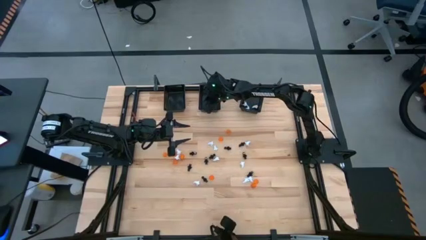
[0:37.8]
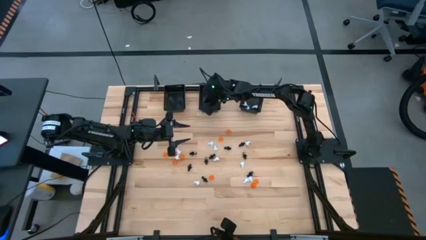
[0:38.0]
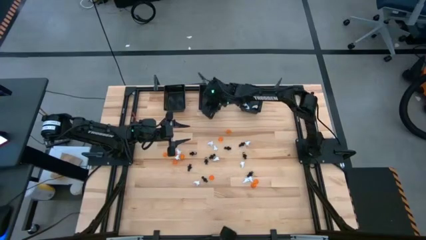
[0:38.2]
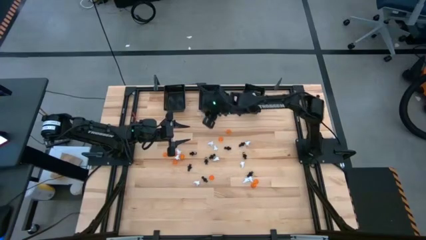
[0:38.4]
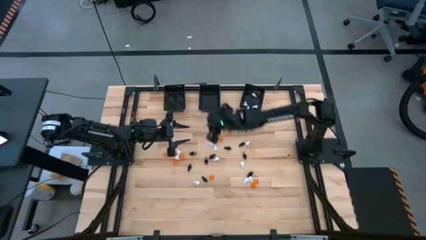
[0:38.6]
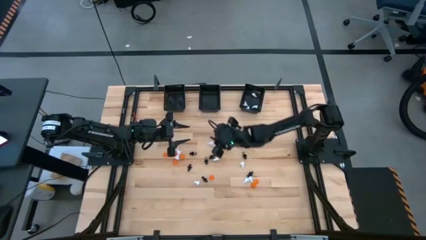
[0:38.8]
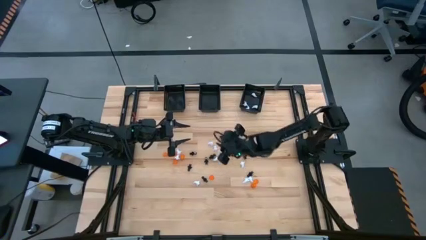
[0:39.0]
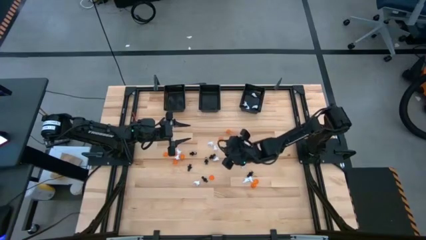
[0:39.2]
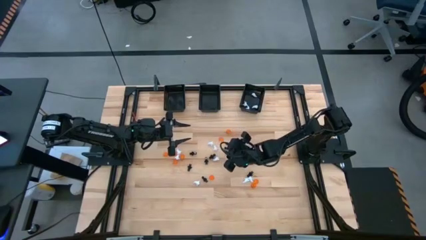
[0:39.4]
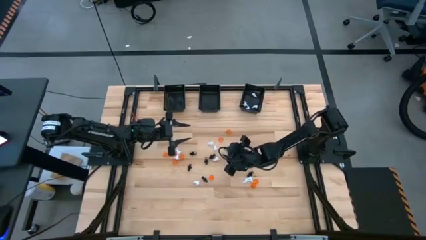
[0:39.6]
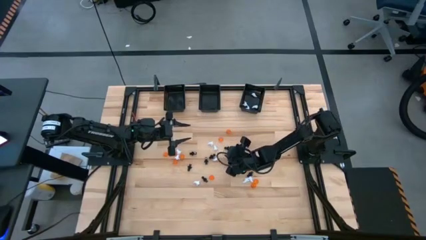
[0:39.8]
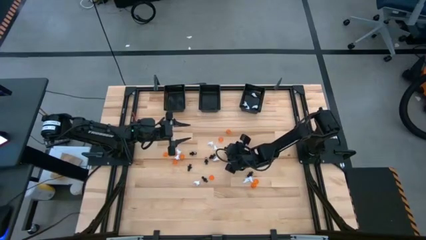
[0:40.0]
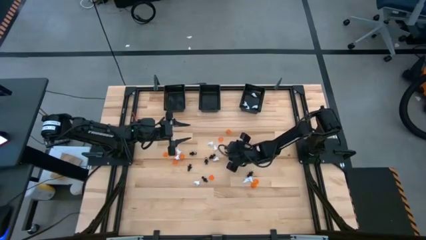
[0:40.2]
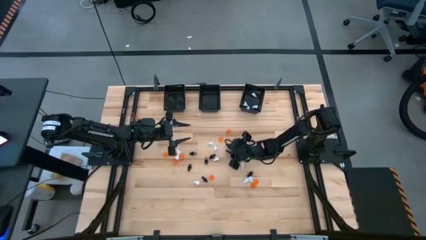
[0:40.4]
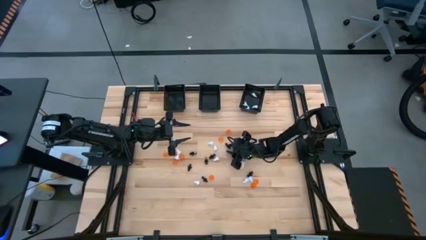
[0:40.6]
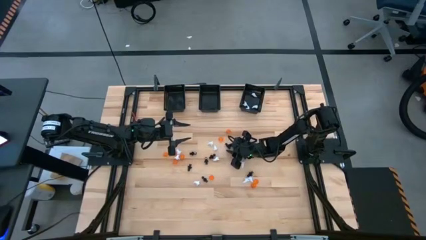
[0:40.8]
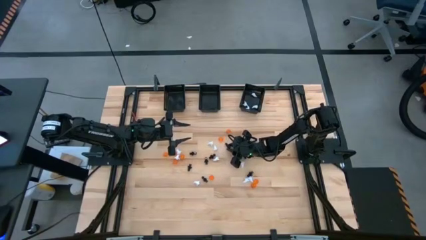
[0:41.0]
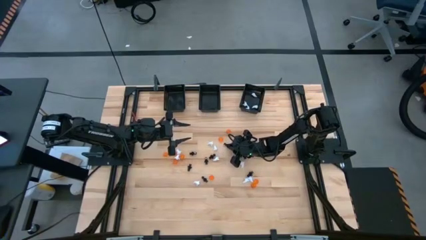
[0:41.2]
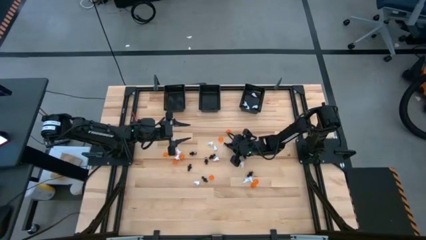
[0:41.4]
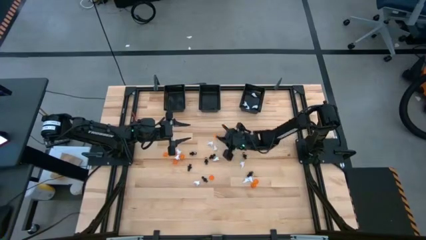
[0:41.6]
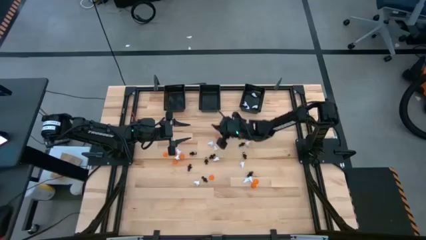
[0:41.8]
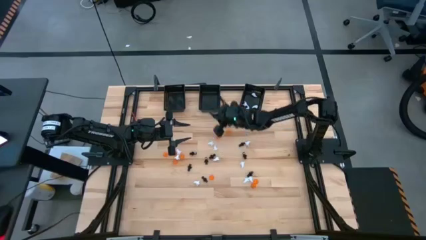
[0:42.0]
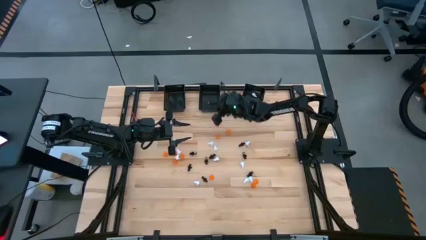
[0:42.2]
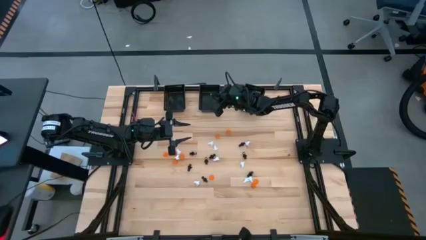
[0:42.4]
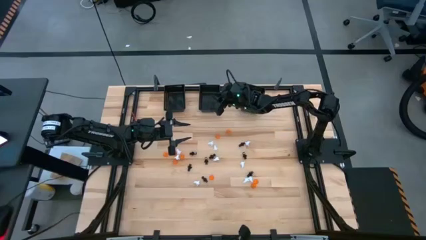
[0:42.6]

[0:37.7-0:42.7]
Task: Sort Halloween decoration
Put the black skeleton toy into the black middle basket

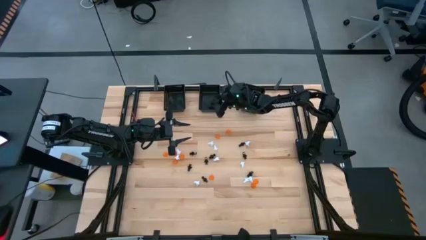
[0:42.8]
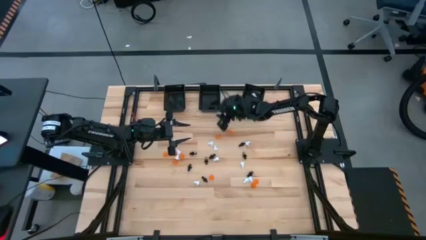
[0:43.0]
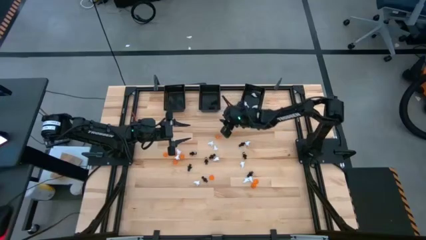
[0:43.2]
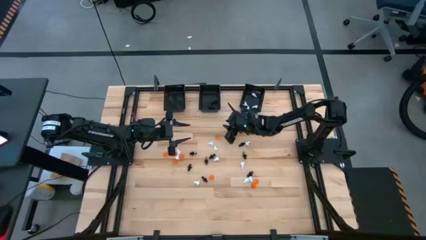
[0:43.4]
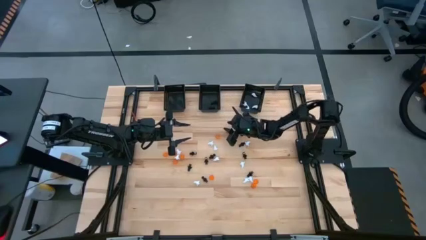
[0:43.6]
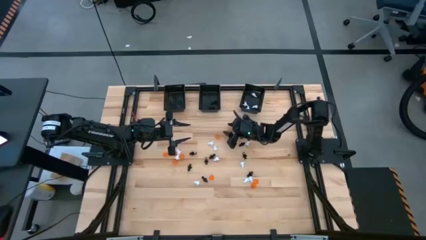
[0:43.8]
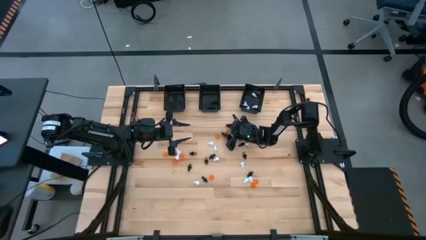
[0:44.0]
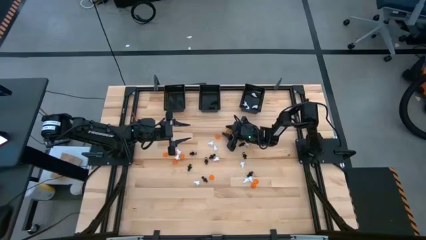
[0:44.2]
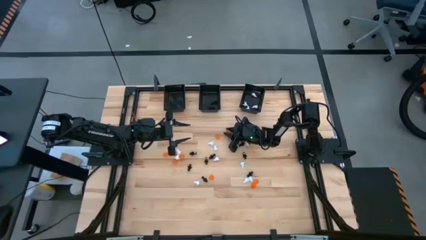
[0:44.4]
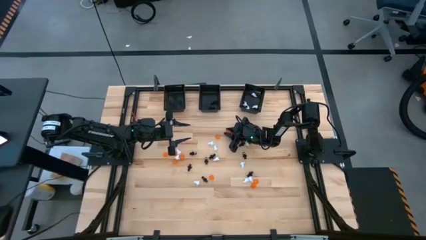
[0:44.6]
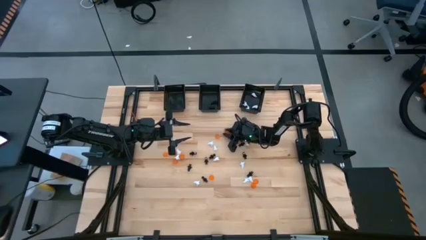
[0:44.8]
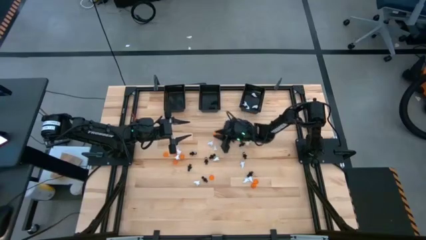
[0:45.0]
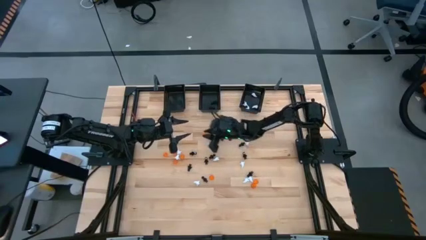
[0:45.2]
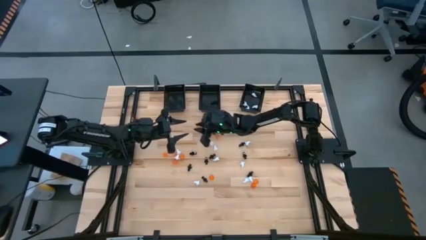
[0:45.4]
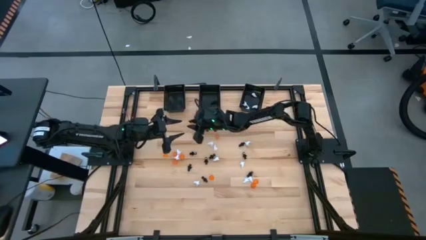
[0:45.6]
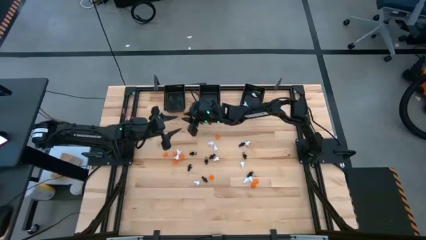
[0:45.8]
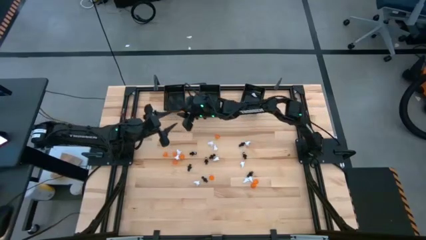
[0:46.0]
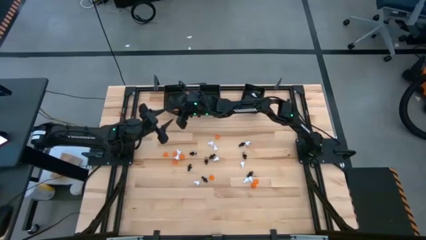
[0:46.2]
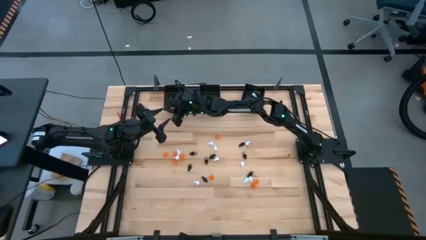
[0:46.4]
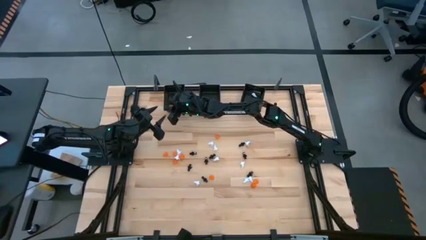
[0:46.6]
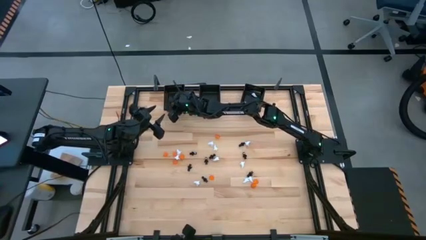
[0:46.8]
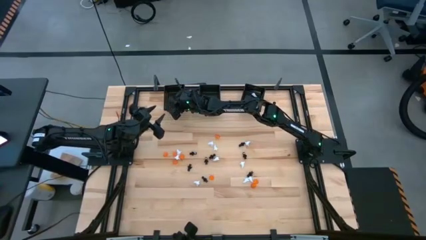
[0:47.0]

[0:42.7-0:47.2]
Put the orange pumpkin toy into the left black basket

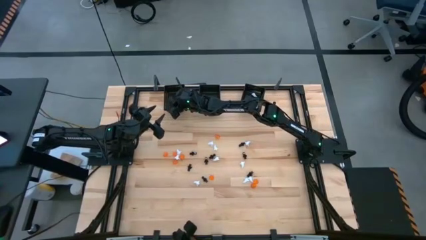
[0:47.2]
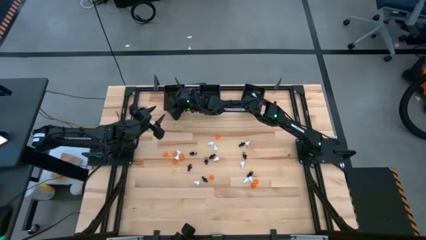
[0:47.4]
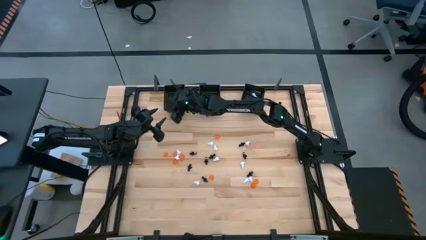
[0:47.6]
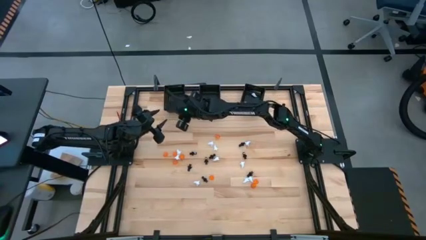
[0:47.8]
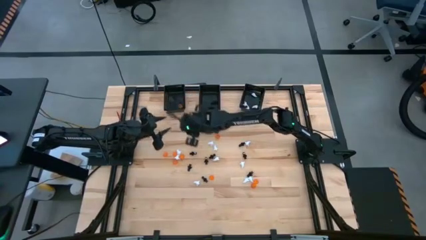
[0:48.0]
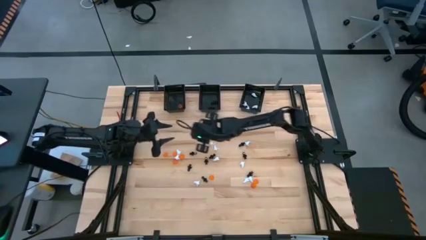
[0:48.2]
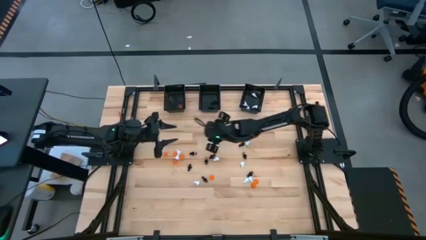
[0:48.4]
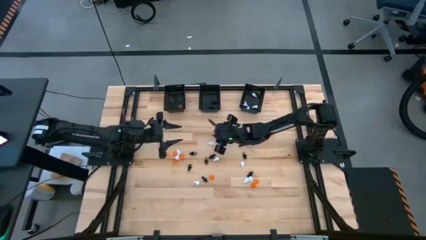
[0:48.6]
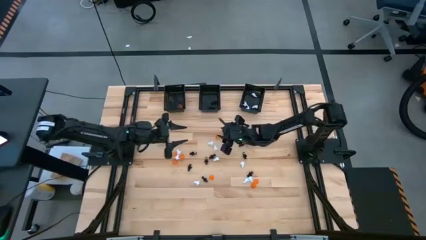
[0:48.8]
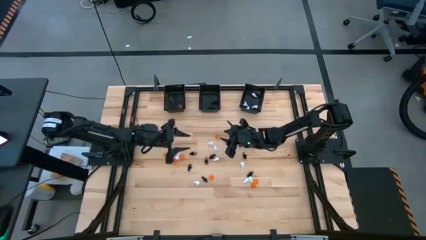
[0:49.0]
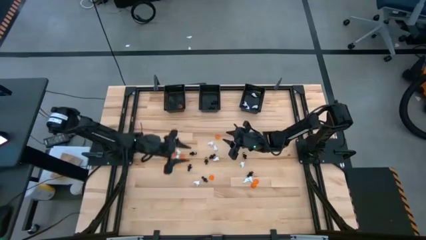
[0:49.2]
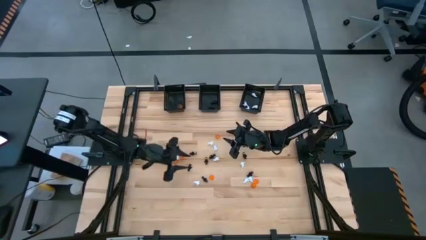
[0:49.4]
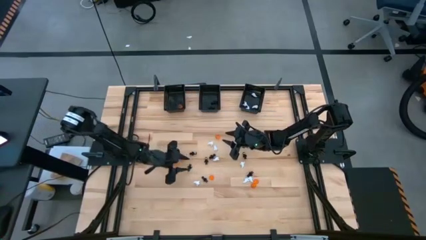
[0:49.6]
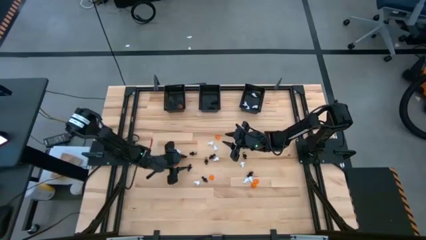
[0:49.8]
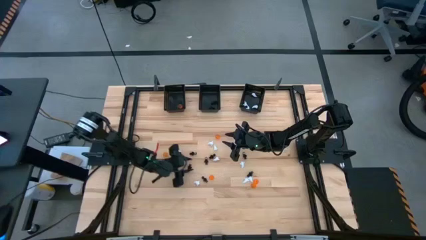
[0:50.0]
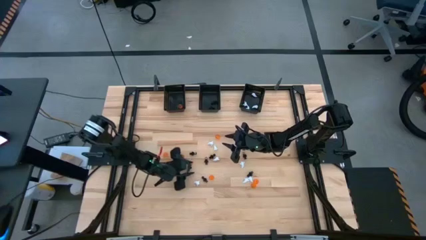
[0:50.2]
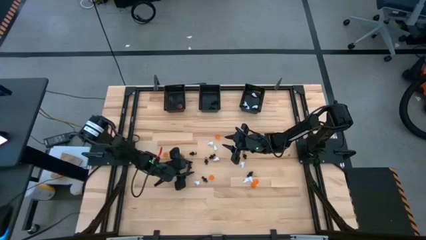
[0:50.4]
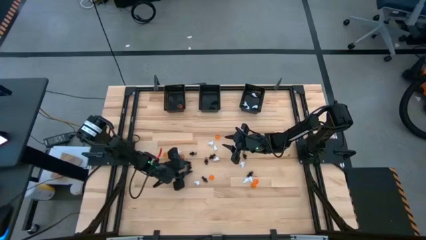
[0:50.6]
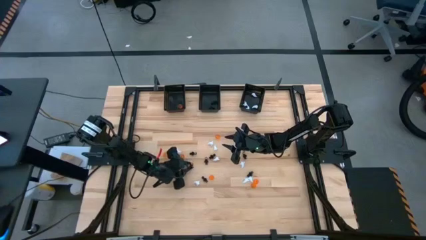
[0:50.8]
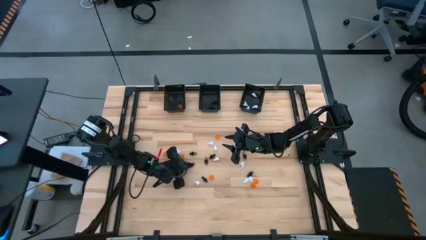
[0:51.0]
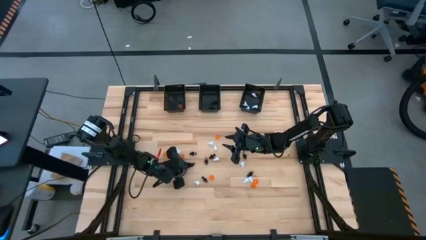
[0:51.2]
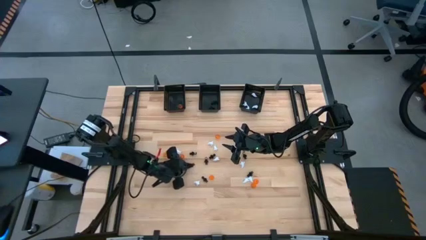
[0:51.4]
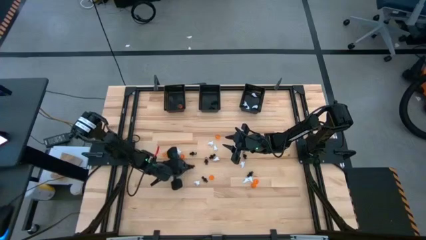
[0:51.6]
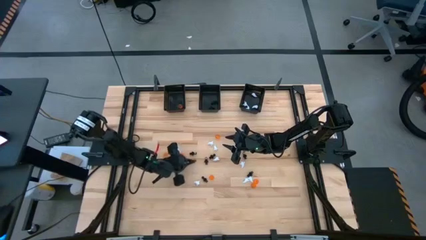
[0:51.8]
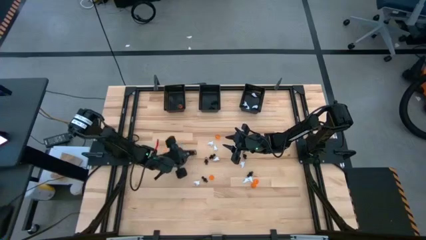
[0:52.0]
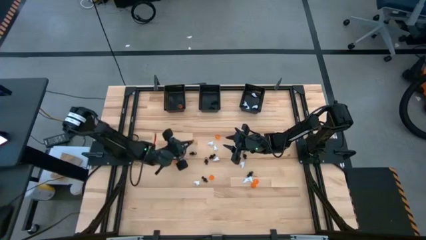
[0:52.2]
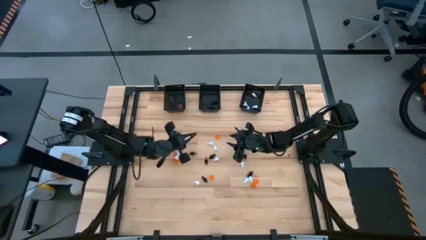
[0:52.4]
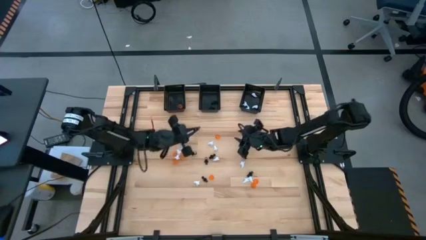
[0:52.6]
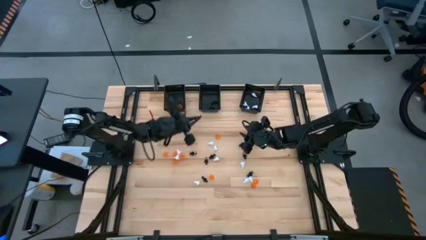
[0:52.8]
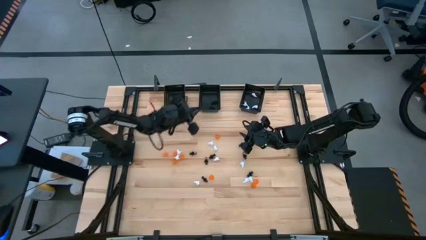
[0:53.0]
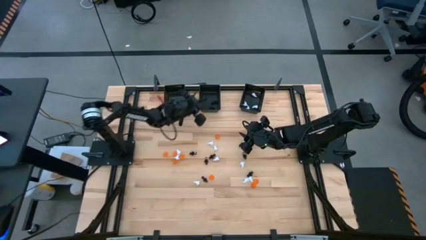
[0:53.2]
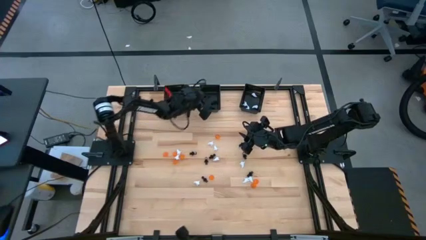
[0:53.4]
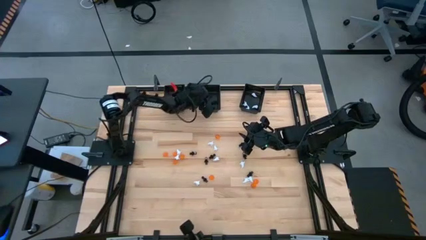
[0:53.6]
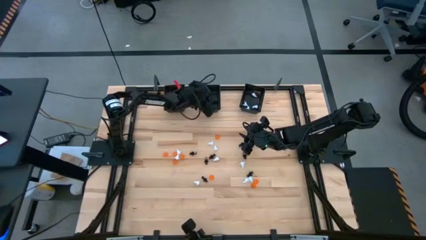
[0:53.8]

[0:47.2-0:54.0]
Put the black skeleton toy into the black middle basket
